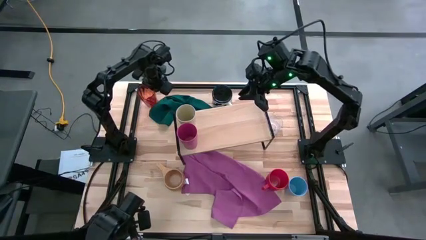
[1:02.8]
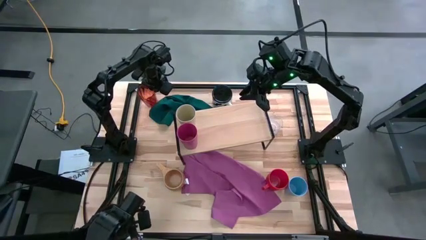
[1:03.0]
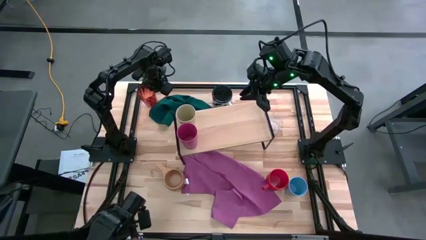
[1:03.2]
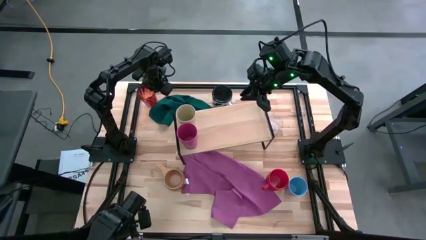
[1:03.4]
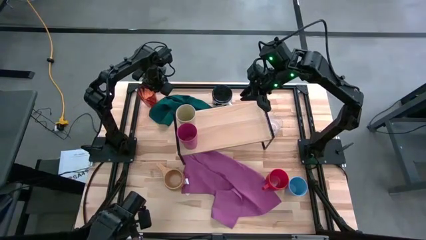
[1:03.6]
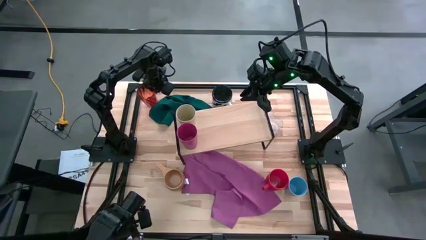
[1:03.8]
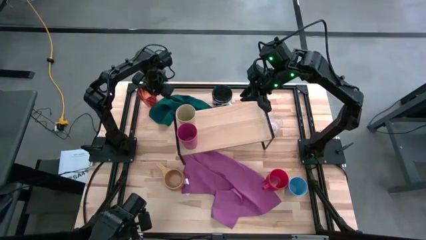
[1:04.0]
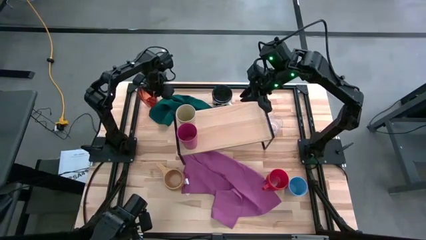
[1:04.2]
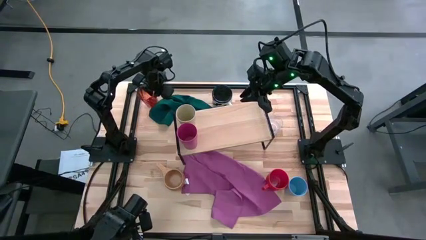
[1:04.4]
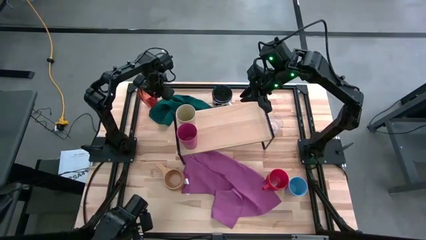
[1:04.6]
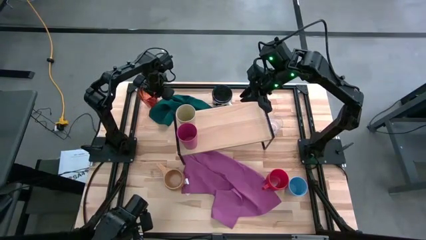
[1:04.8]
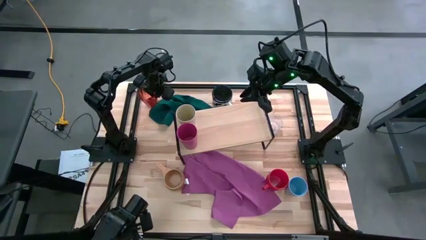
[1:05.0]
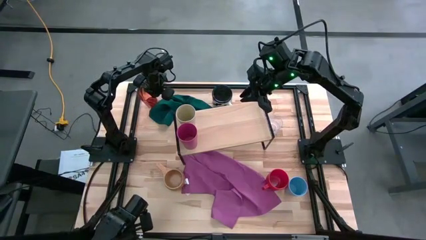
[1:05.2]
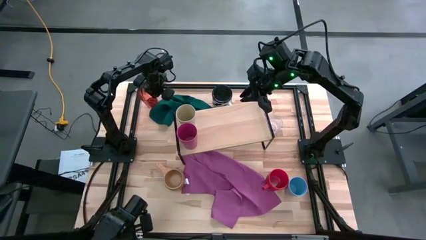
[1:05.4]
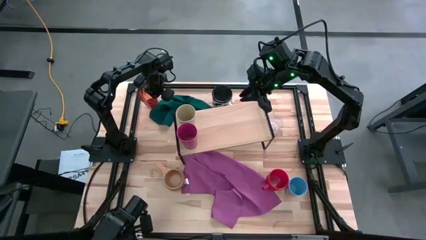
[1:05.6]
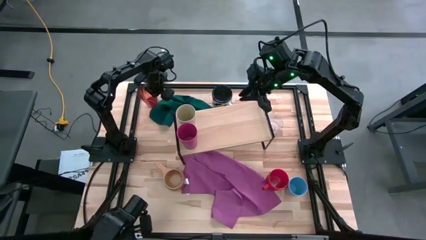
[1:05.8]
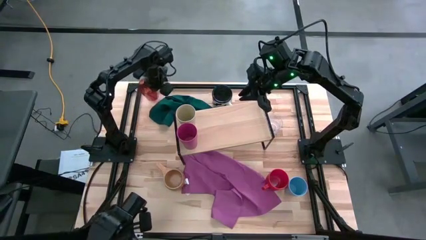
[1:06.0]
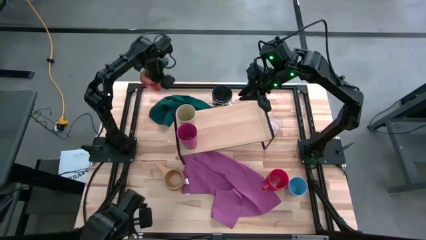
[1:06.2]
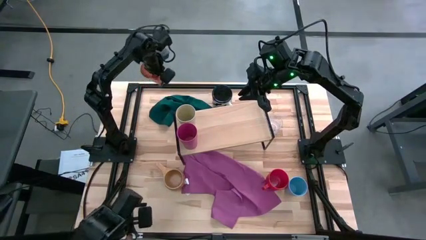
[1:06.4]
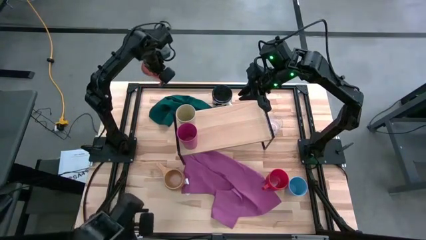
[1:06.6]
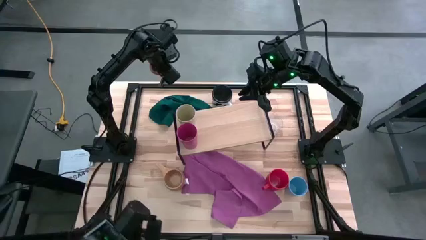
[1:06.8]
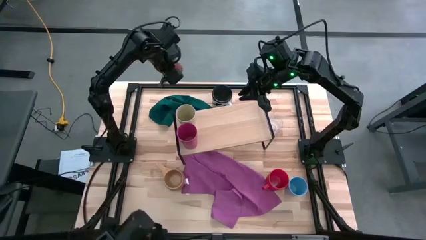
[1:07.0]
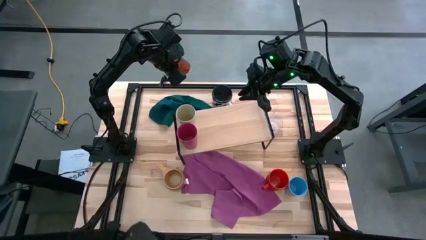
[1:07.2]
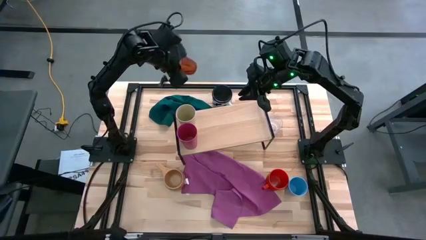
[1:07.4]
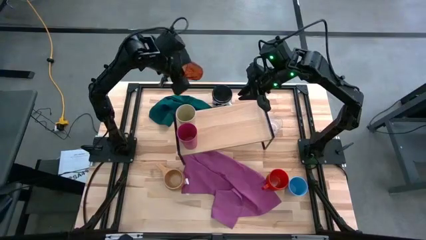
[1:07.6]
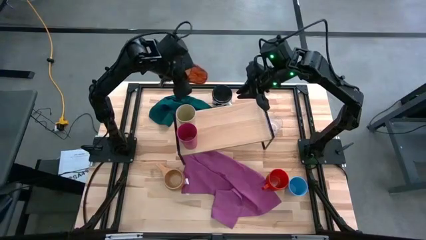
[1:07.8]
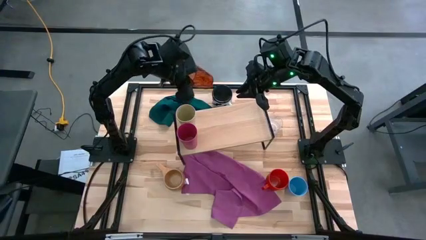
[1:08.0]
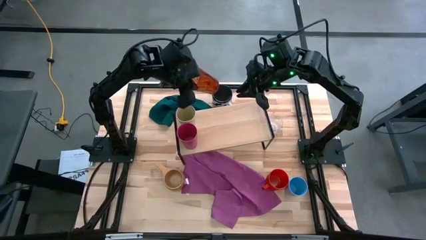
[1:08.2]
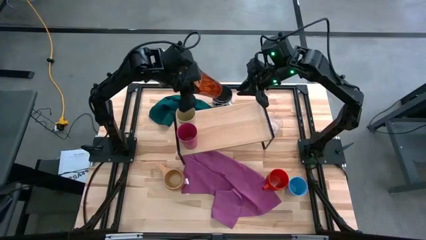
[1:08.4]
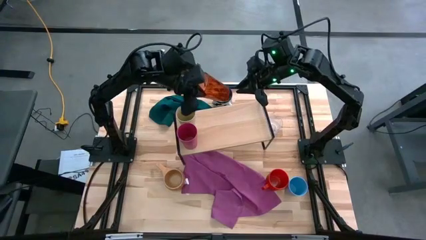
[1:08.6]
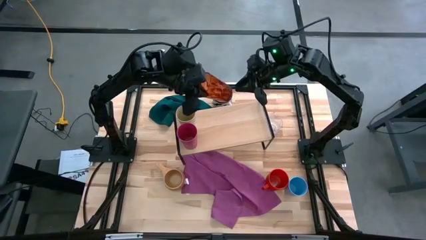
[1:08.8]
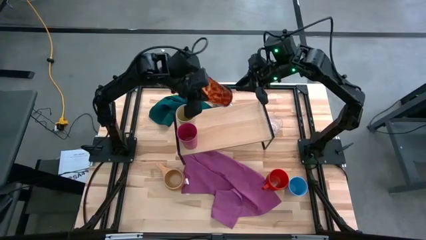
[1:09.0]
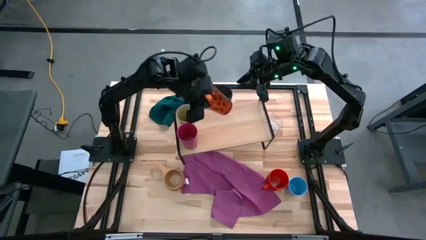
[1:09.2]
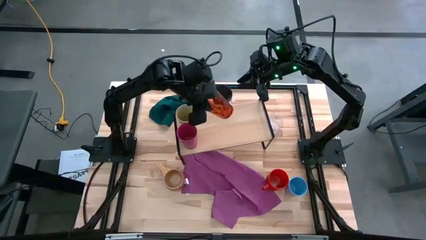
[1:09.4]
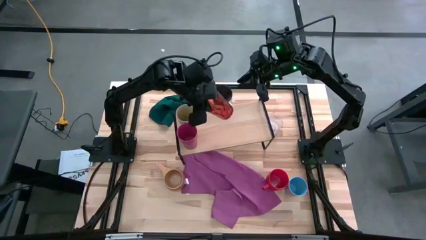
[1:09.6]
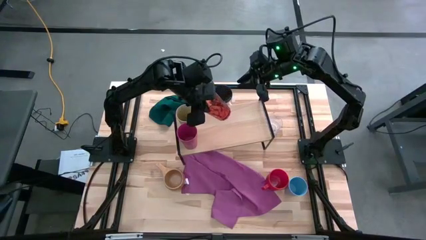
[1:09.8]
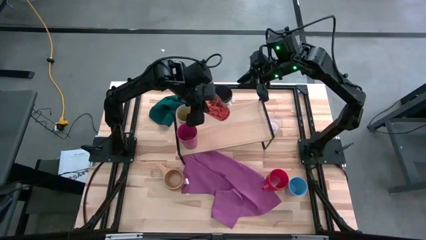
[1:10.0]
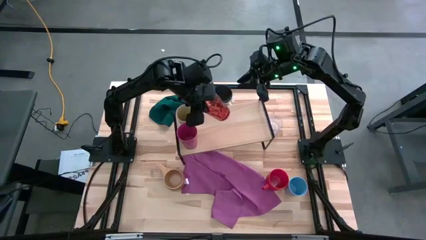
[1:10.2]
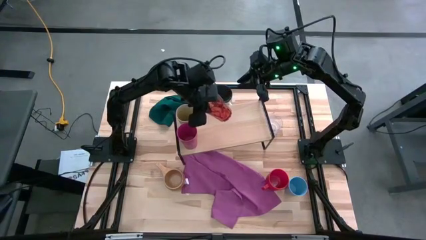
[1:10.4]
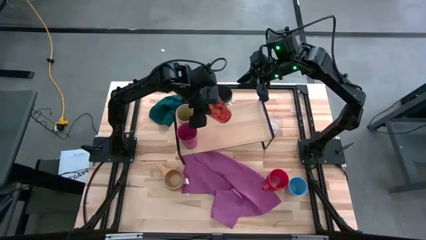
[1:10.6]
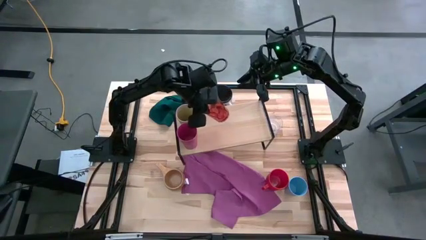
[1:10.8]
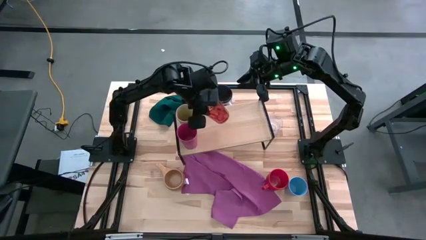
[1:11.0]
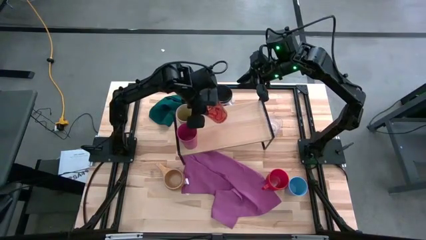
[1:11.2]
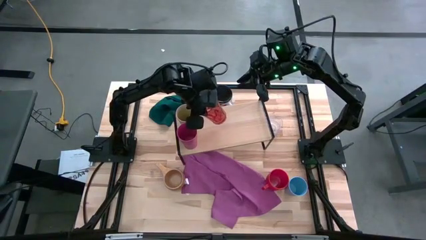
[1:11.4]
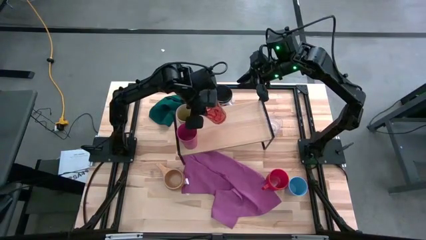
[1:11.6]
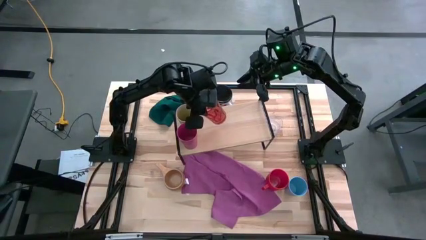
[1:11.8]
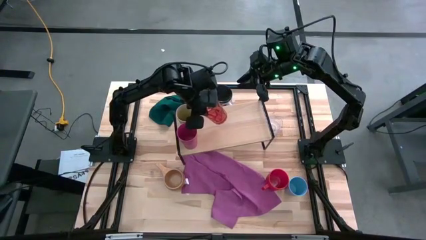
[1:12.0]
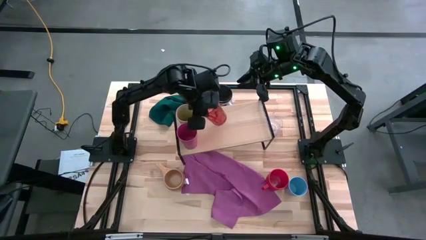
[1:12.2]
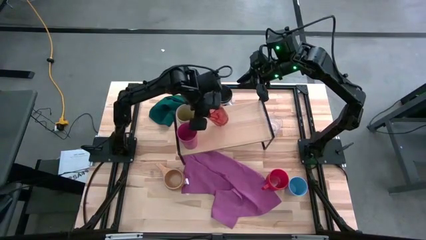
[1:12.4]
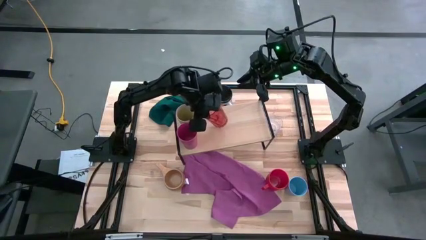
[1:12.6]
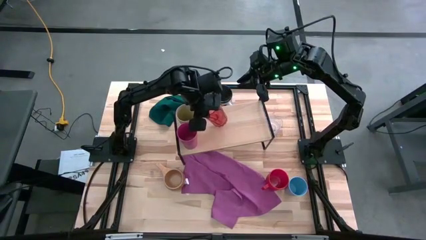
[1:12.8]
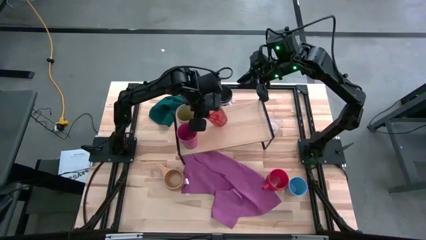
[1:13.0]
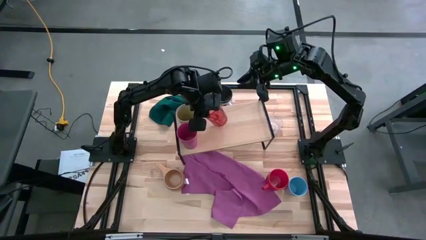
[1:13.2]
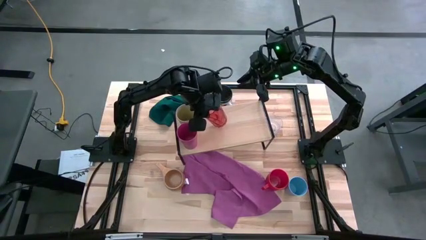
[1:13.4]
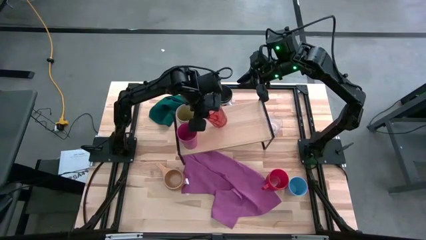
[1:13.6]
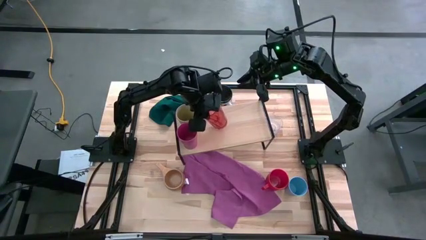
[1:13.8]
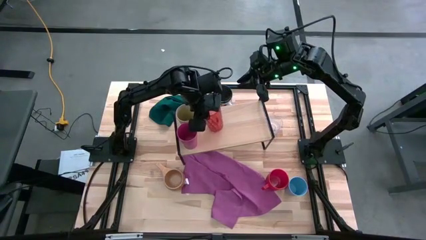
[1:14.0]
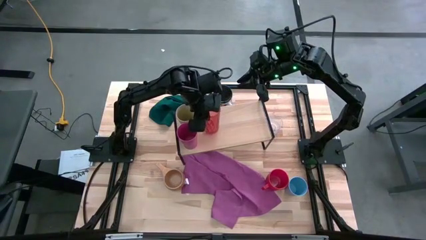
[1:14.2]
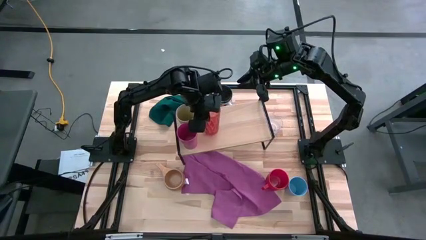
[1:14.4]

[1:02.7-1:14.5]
Task: Stack small to large cups/mugs on shelf
Put the red cup on the shelf

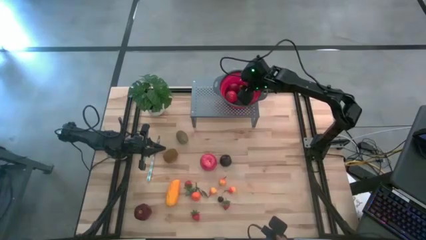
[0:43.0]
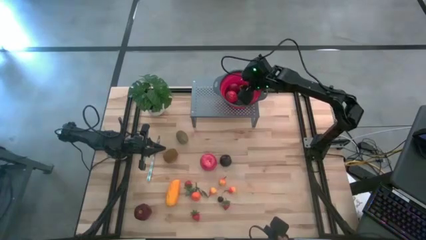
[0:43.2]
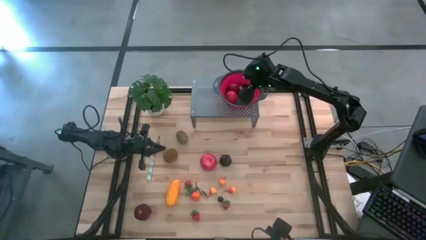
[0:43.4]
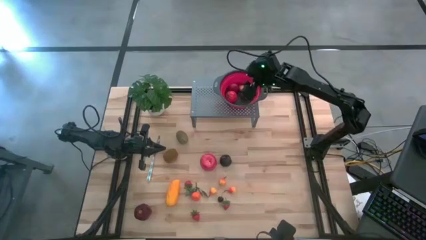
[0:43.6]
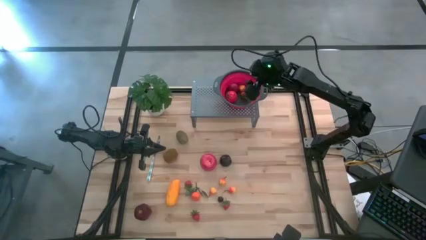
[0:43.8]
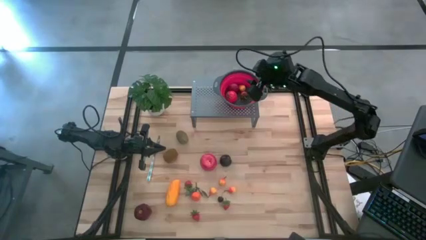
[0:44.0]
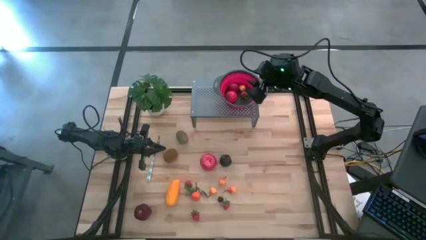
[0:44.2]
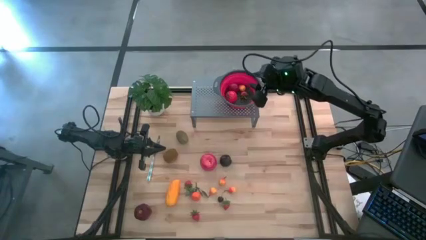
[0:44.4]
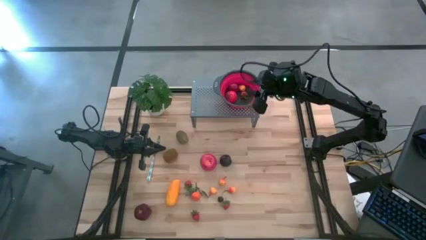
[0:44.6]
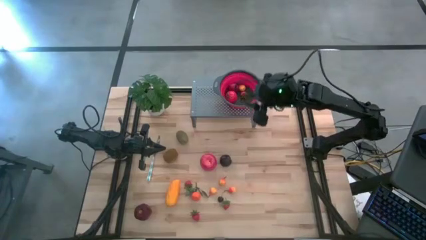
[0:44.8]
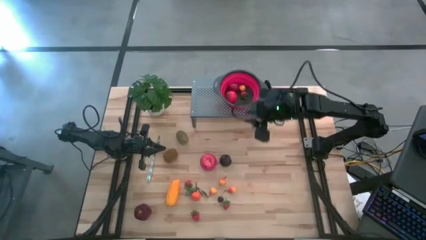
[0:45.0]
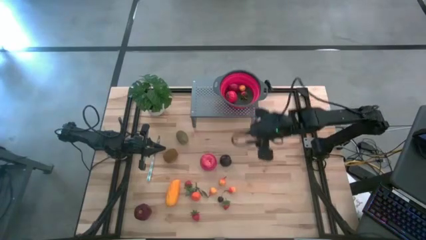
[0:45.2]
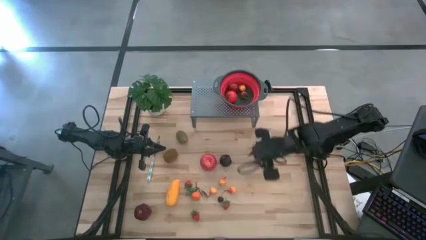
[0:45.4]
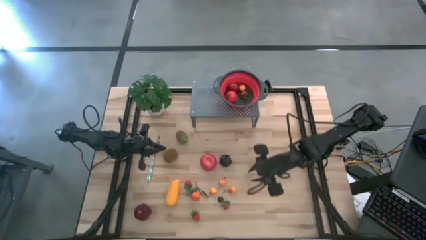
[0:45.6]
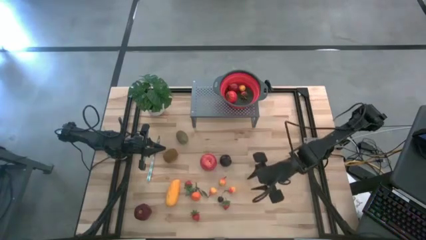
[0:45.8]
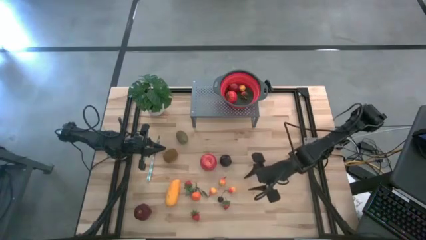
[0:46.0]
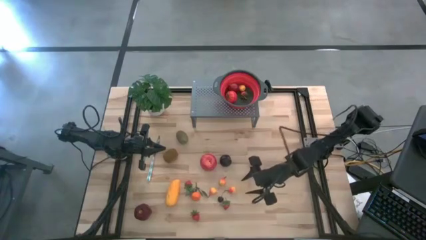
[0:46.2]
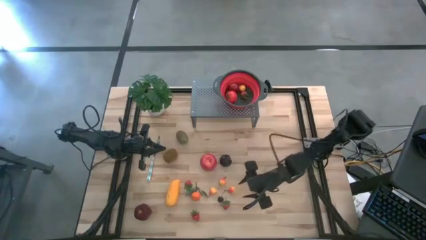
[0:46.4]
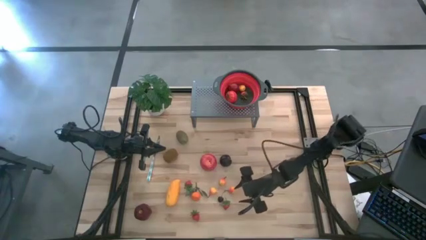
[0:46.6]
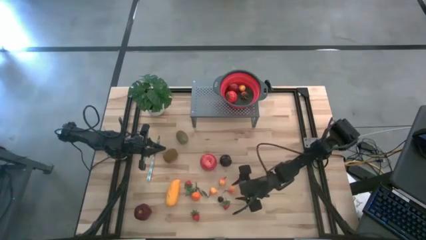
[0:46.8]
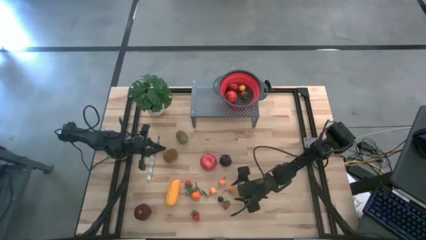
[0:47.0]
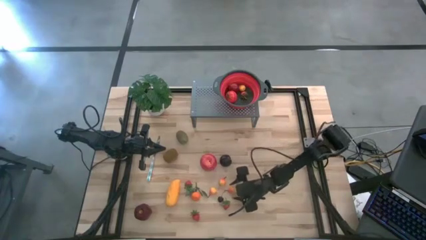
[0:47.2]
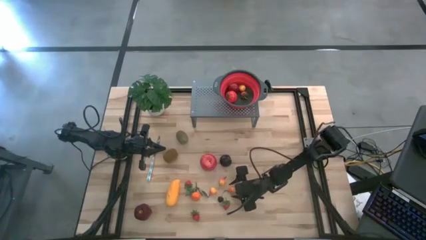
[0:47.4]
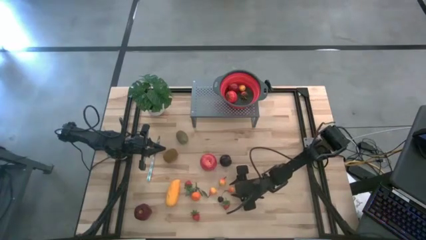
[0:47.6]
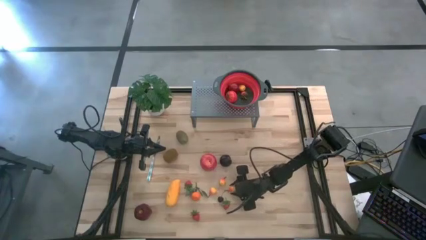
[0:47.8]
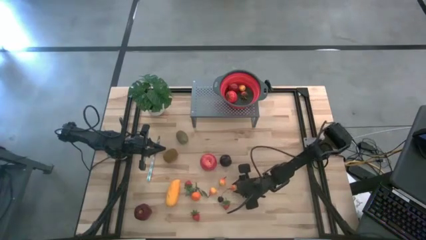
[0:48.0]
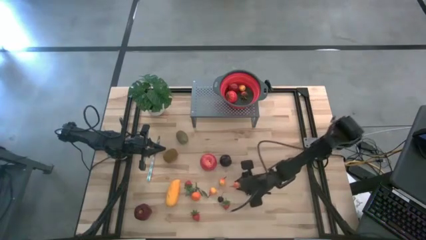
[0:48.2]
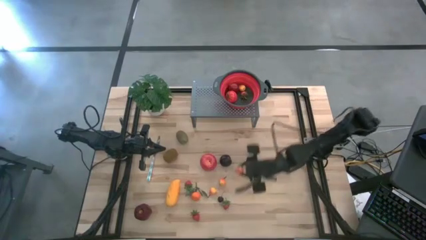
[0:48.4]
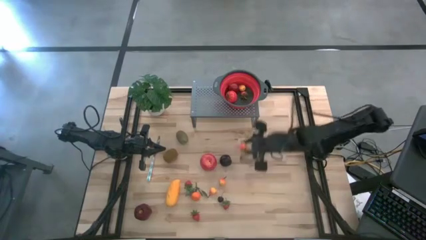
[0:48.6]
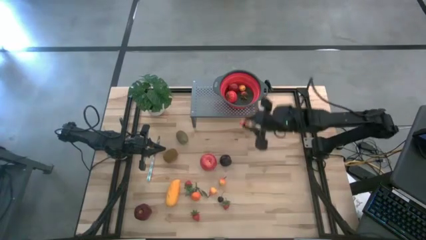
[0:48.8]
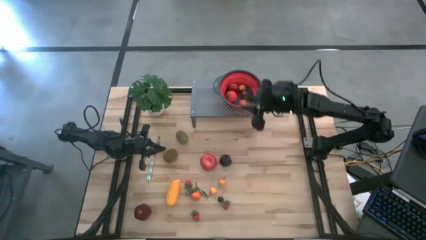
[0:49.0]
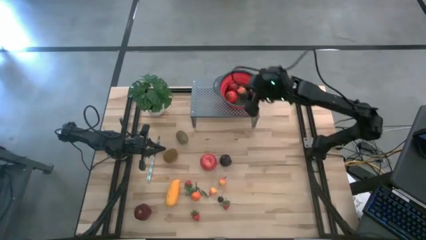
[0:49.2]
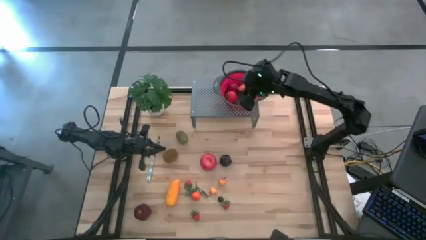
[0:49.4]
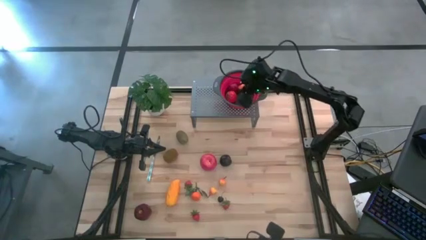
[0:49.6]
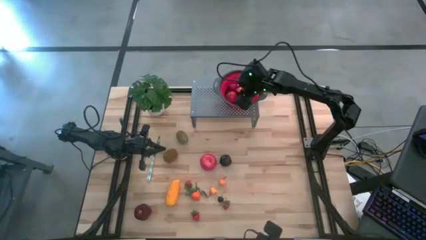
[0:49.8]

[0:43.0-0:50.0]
Task: Pick & Place Fruit
Put the peach into the strainer bowl on the shelf
